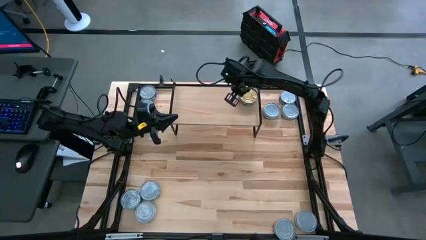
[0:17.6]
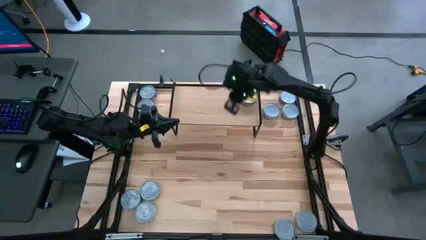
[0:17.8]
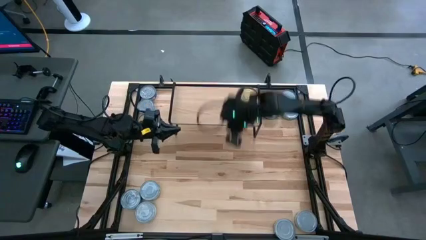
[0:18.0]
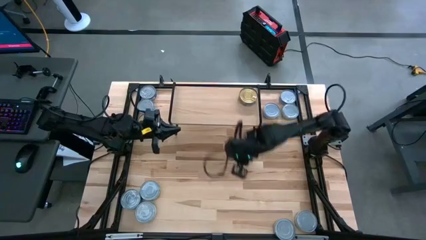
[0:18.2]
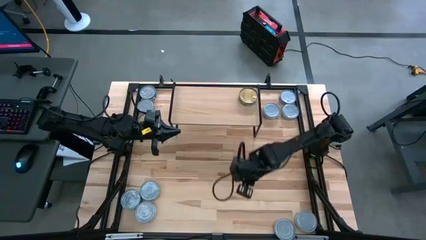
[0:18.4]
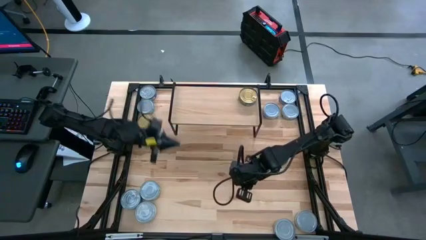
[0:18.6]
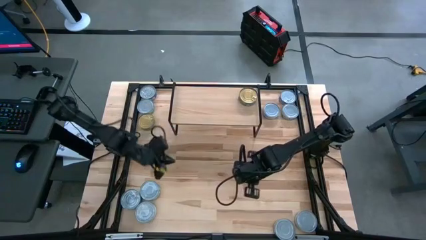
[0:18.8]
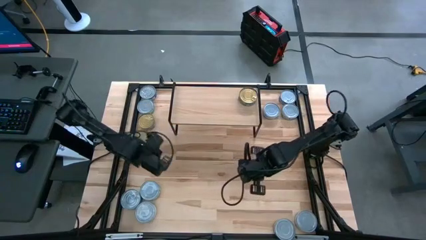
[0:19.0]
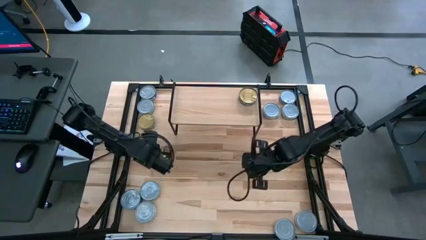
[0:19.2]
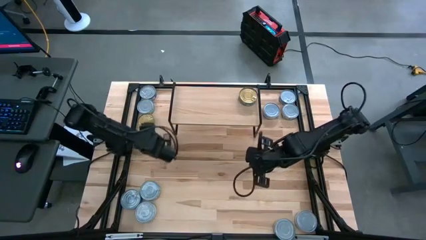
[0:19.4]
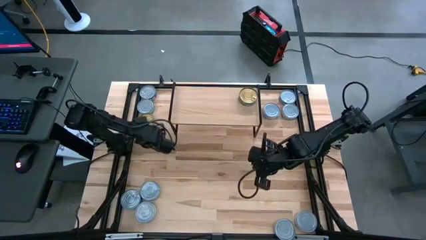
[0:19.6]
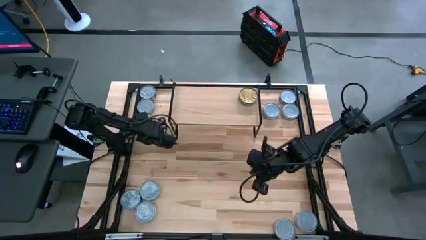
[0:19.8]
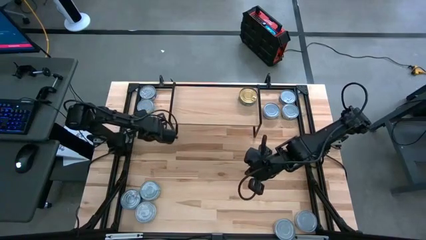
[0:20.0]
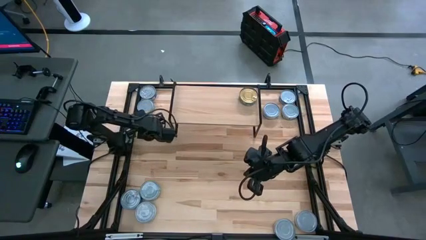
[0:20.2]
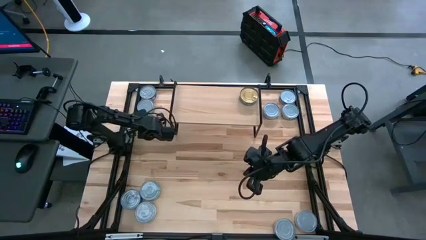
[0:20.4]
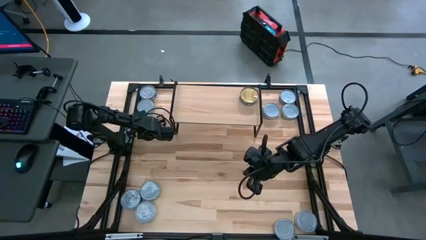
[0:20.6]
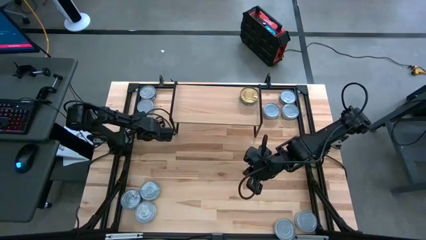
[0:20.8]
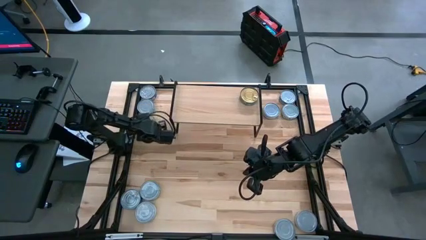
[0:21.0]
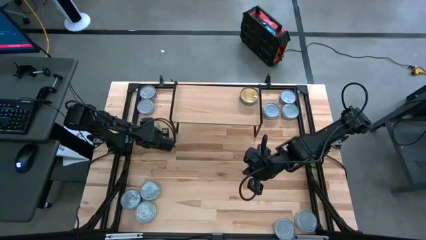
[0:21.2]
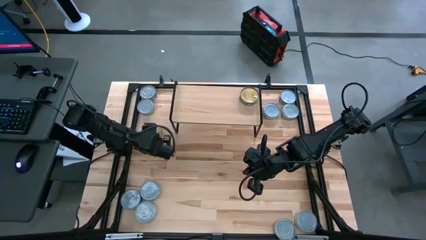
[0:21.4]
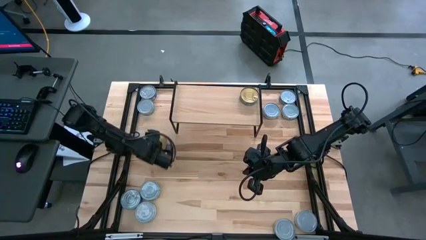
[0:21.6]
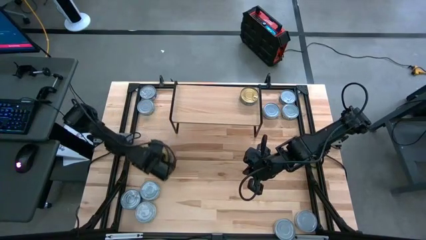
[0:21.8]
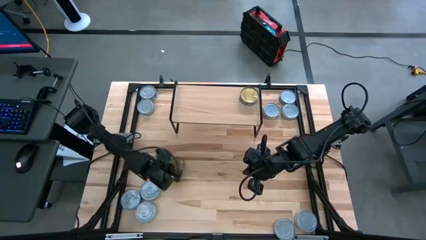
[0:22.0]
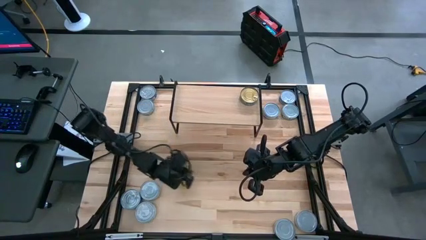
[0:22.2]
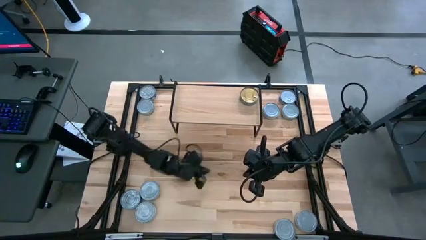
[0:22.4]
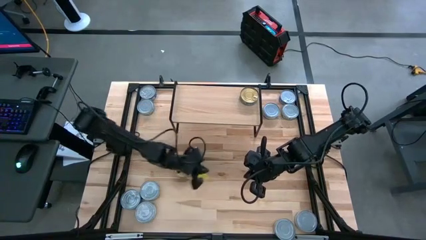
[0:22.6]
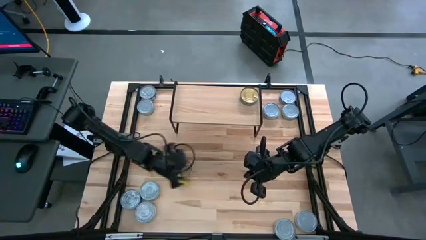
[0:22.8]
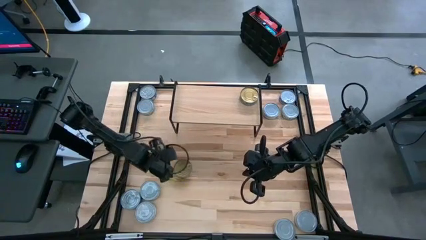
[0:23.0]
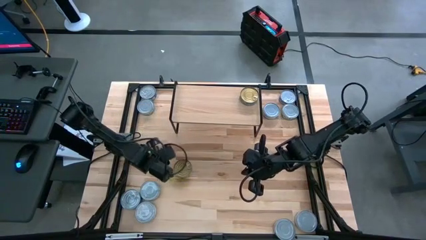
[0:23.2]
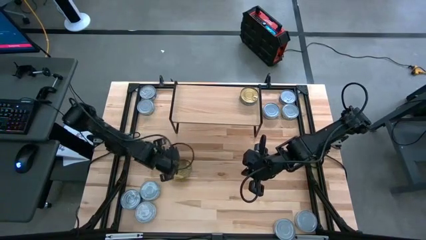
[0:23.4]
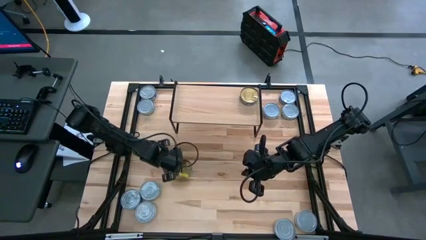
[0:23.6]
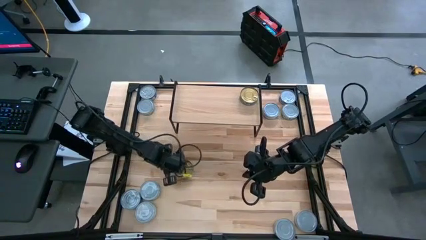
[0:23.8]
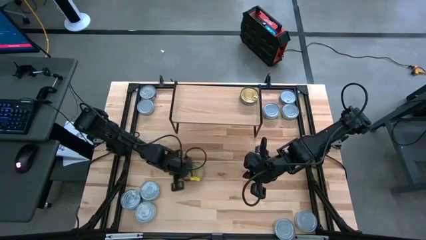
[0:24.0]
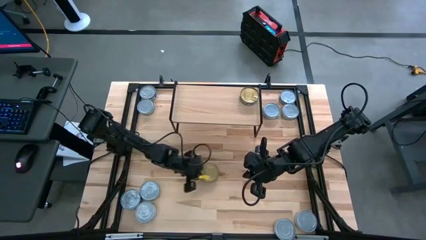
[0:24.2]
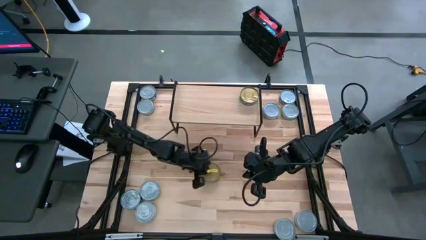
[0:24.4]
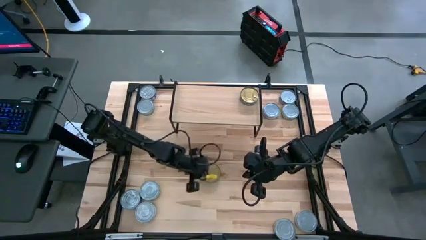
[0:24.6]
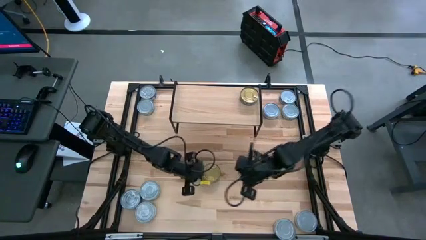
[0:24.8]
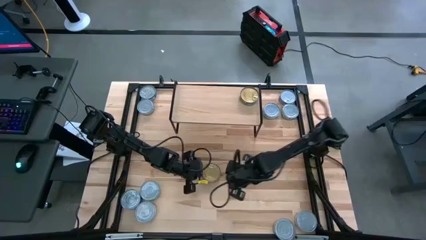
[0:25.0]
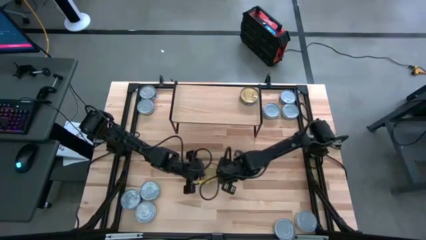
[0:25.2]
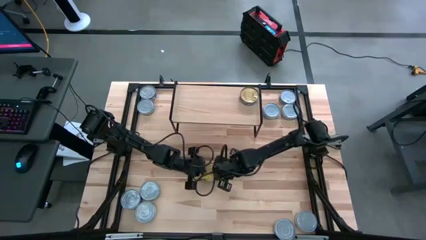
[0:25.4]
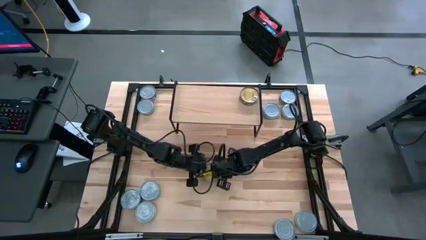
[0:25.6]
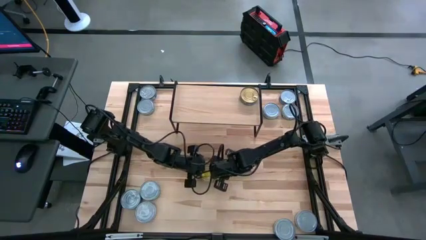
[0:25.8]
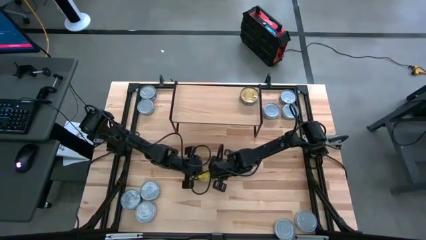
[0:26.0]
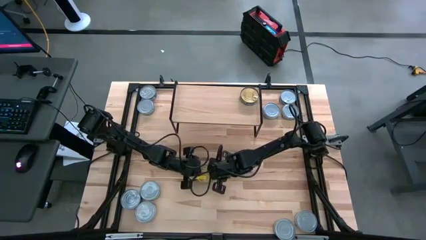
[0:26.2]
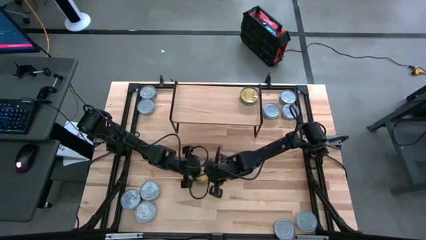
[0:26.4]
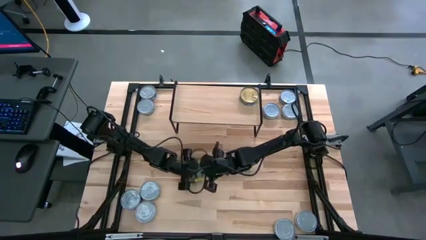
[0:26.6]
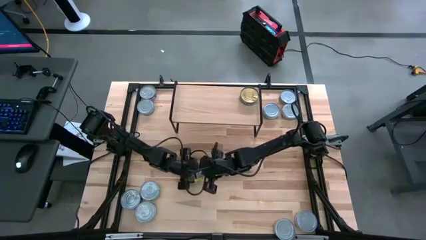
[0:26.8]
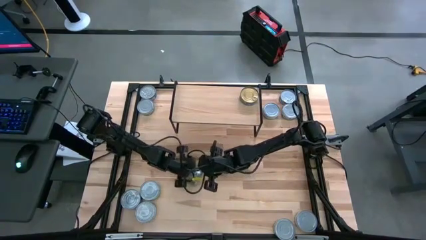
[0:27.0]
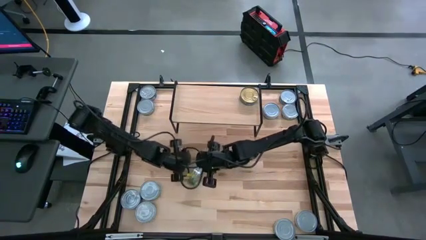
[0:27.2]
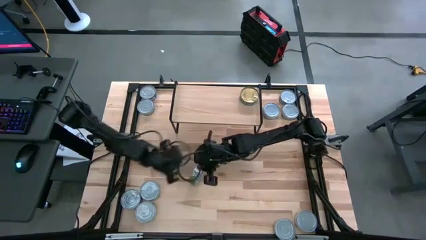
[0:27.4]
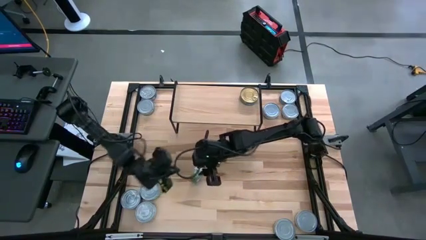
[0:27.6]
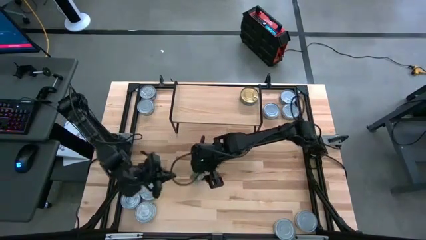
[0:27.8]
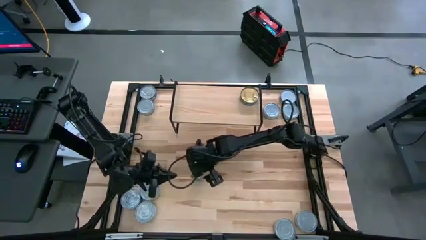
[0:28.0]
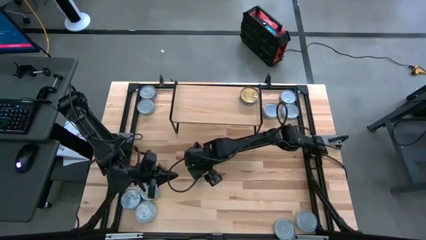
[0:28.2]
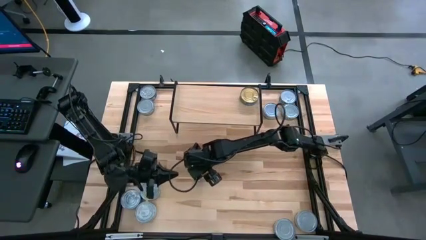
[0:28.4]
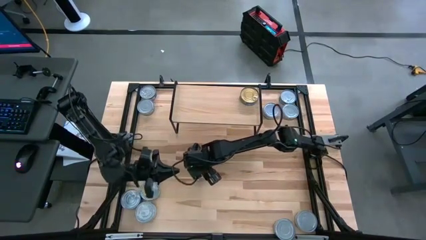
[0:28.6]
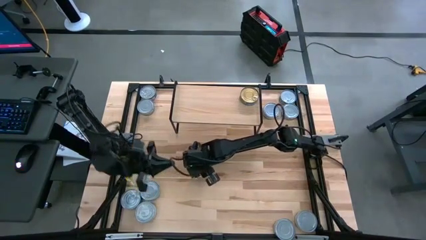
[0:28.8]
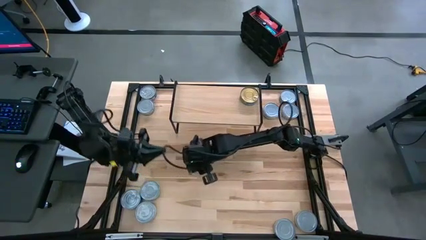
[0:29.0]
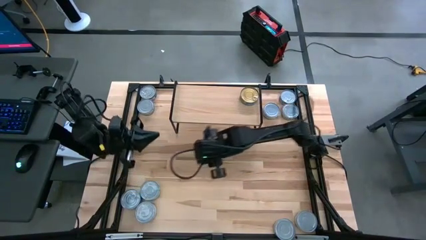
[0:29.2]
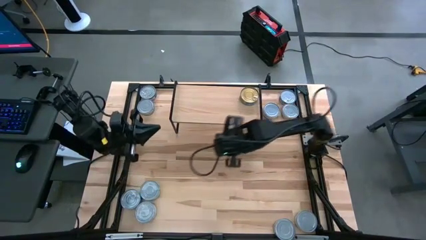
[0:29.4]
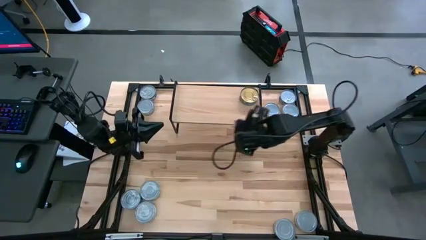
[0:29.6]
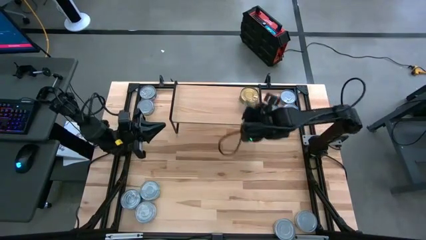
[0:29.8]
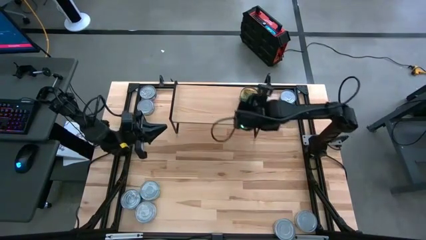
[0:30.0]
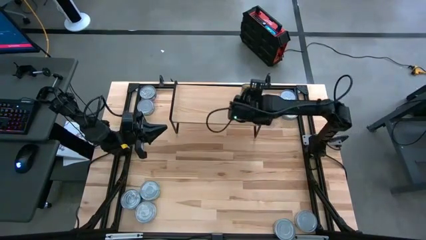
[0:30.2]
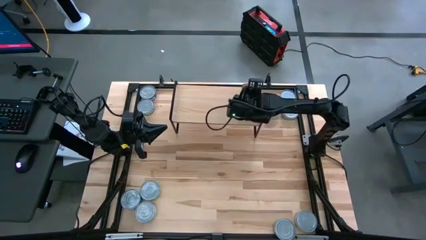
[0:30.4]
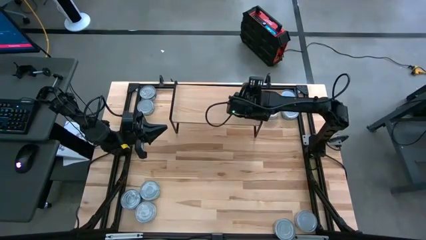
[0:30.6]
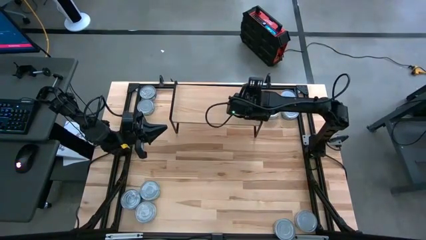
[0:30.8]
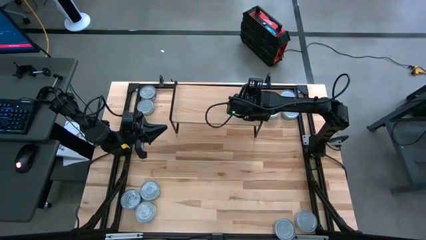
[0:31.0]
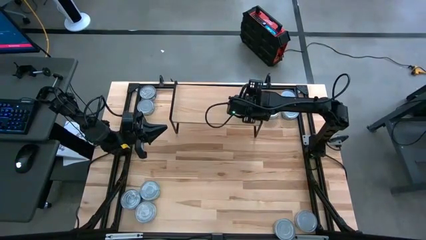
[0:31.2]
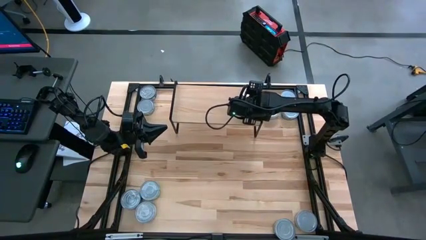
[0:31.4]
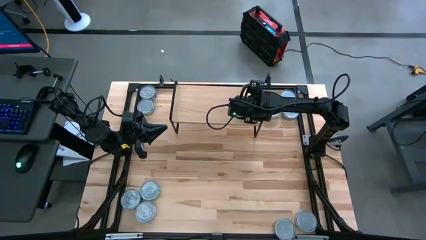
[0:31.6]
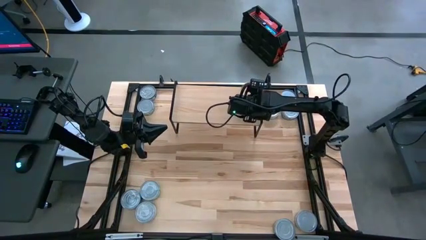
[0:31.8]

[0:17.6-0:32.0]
Task: Stack canned seafood by type on shelf
Stack the green tuna can on top of the other green tuna can on the shelf

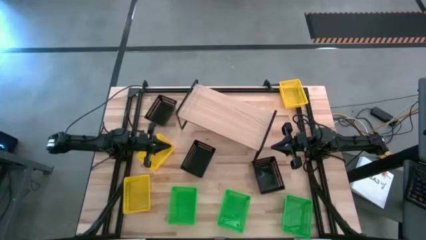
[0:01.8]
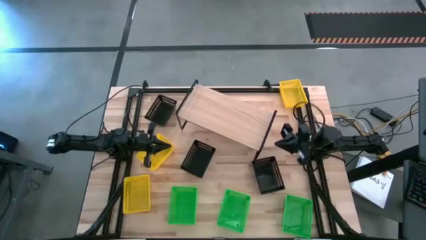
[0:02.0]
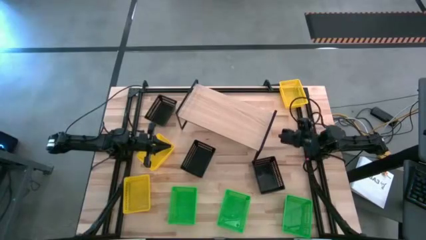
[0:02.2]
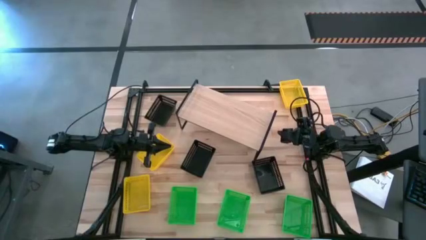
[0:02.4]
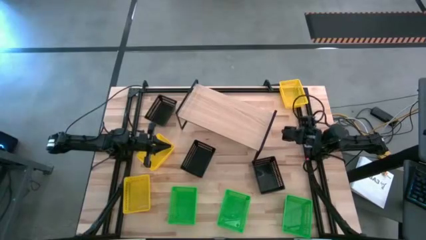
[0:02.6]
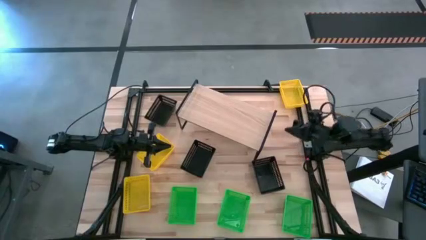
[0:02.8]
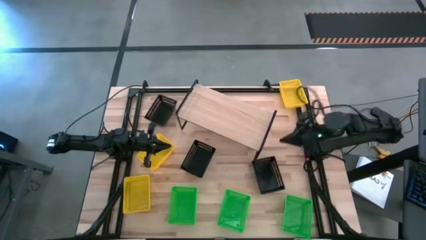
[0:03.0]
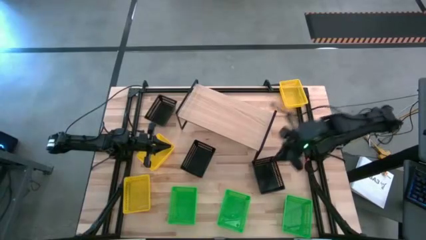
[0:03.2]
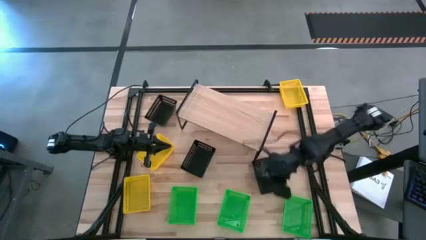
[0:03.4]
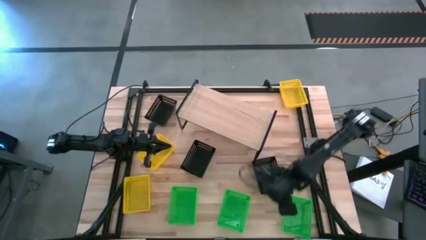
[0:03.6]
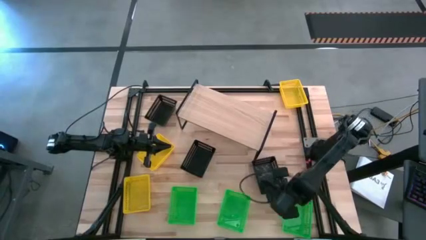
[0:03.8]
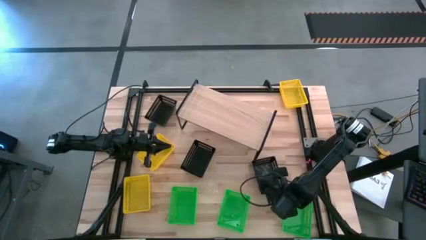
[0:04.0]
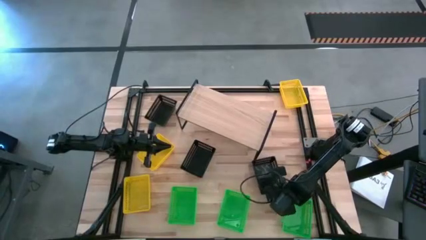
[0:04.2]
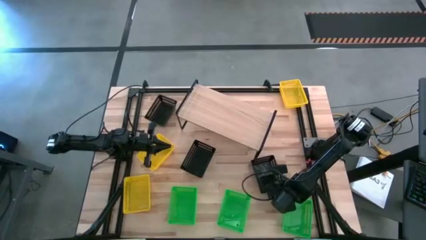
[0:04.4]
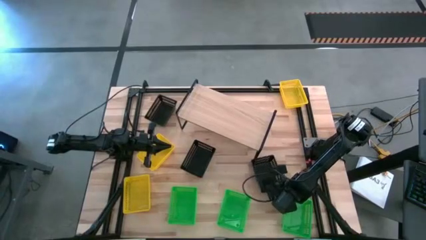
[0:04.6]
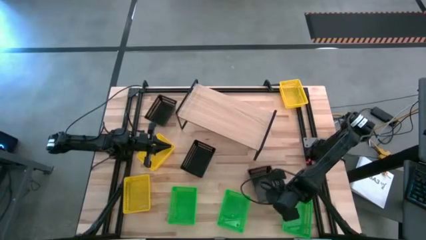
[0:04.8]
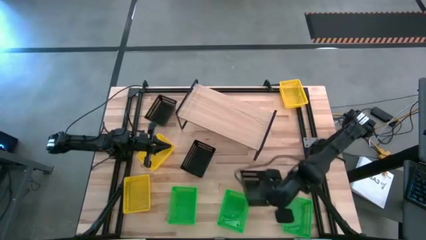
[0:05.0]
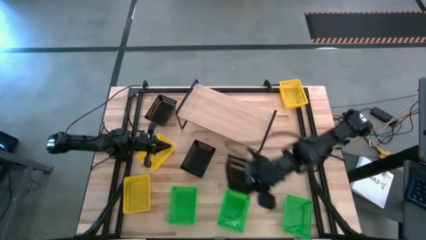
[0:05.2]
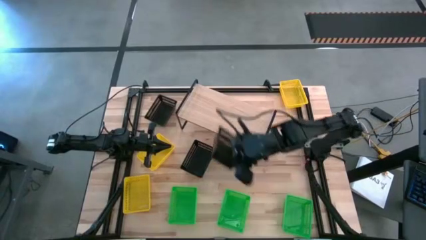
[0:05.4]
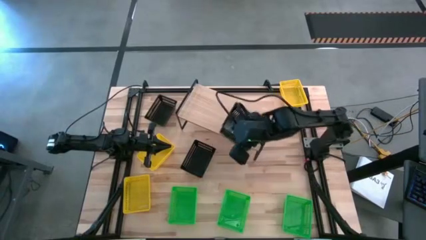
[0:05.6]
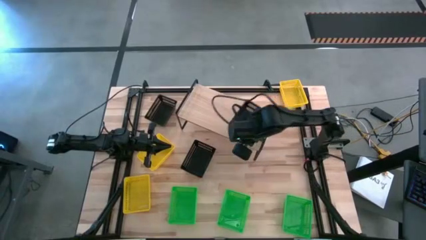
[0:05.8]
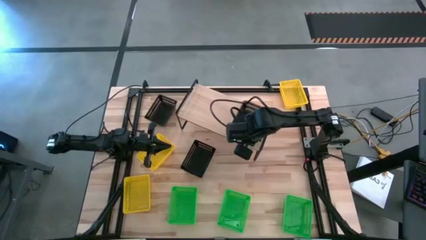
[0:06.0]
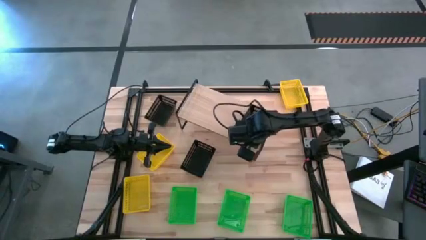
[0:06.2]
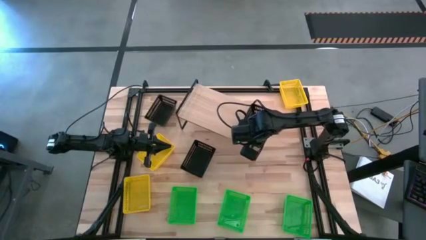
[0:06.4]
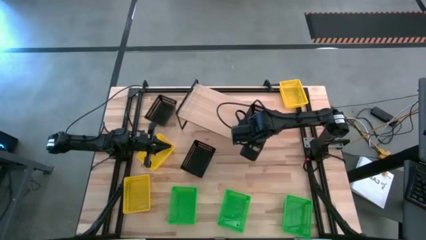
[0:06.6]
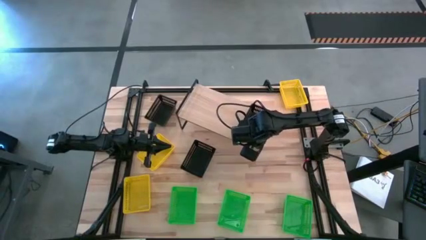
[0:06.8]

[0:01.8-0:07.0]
Task: Stack baskets on shelf by color
Put the bottom right black bin on the shelf
